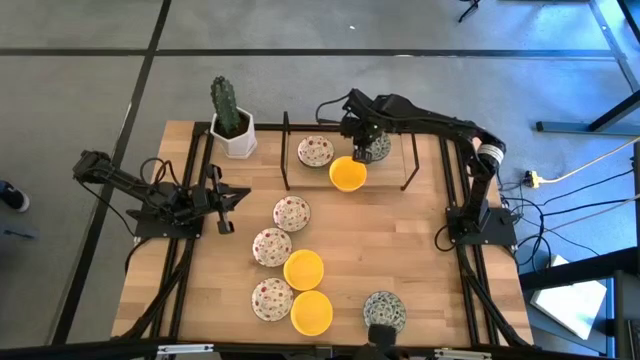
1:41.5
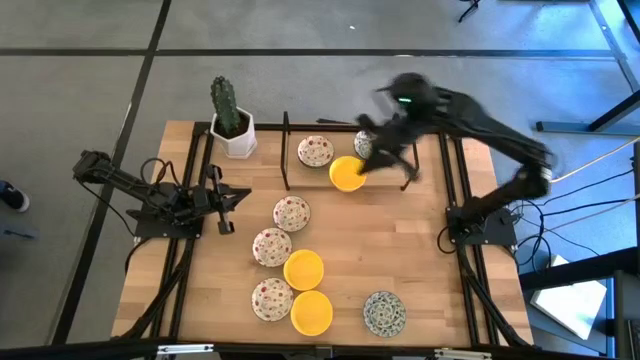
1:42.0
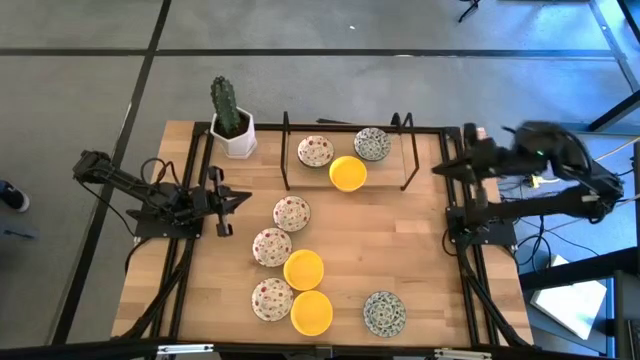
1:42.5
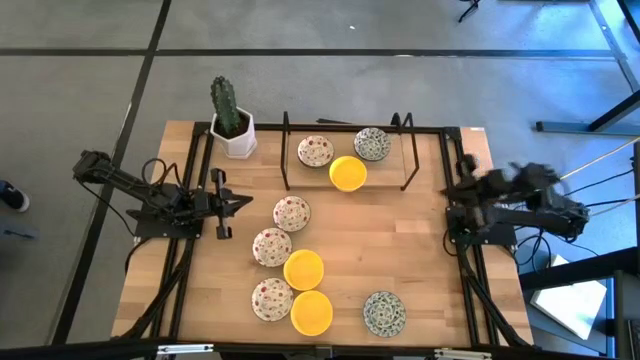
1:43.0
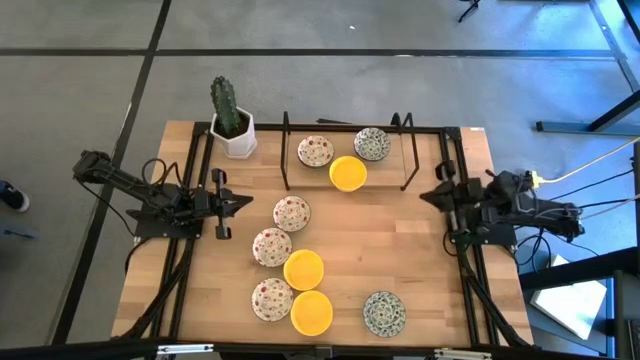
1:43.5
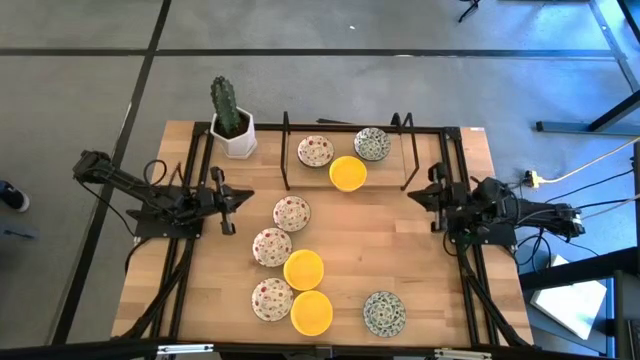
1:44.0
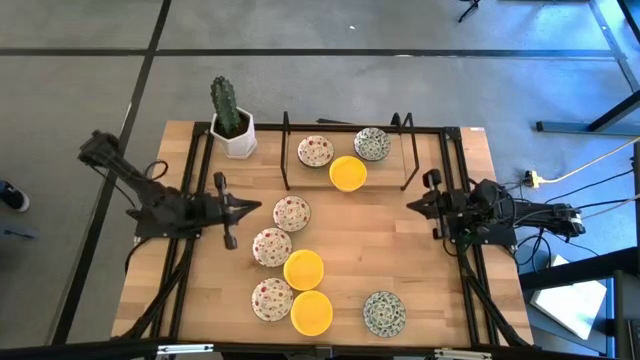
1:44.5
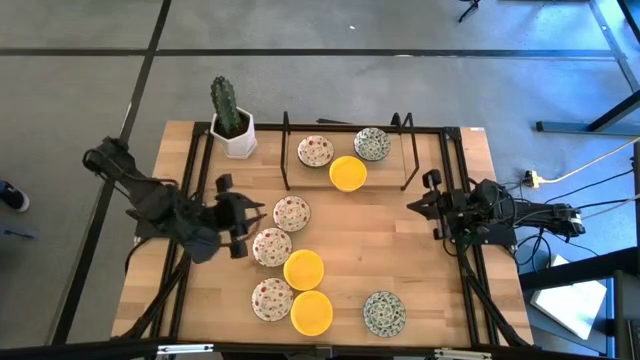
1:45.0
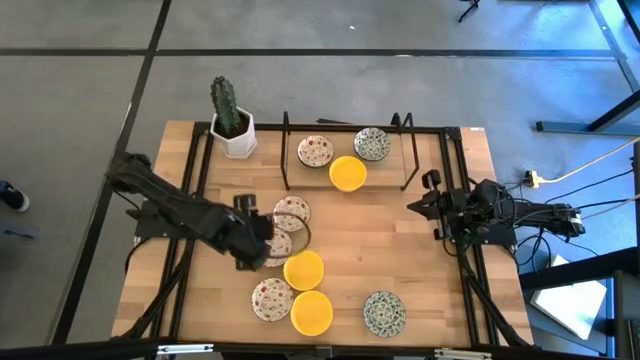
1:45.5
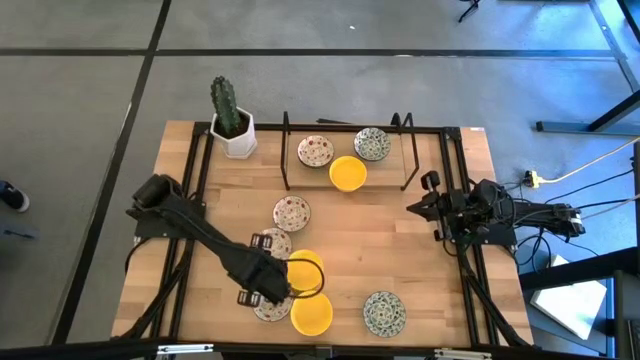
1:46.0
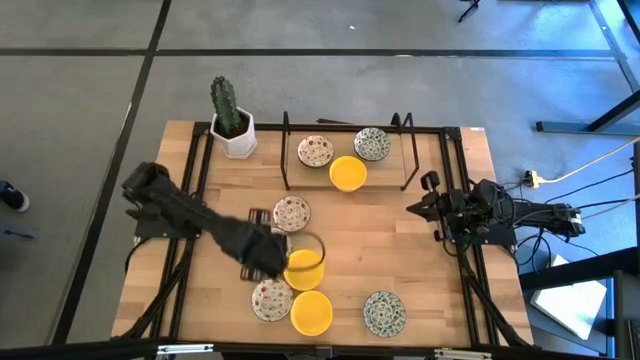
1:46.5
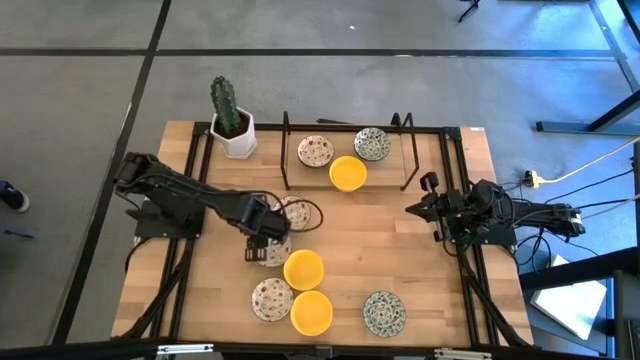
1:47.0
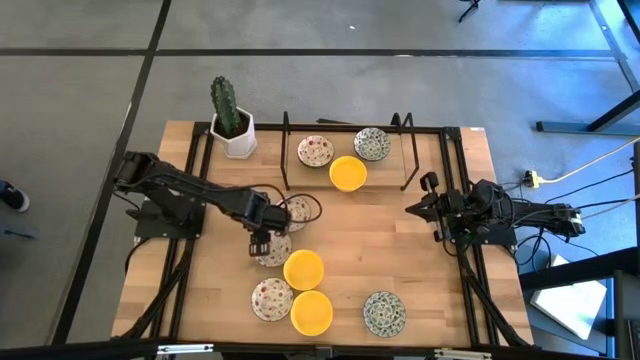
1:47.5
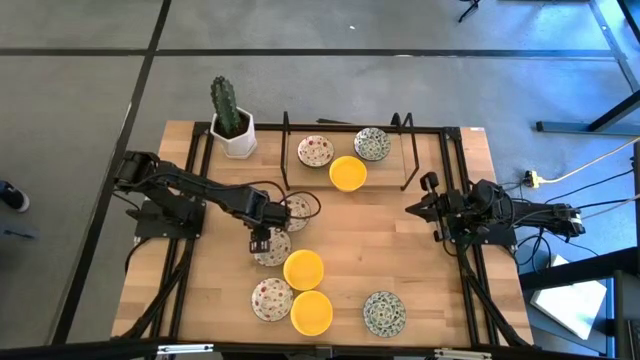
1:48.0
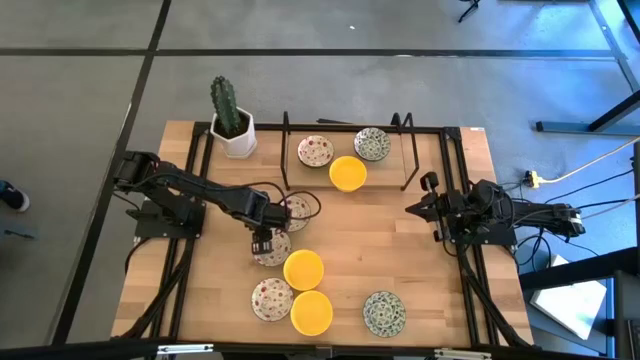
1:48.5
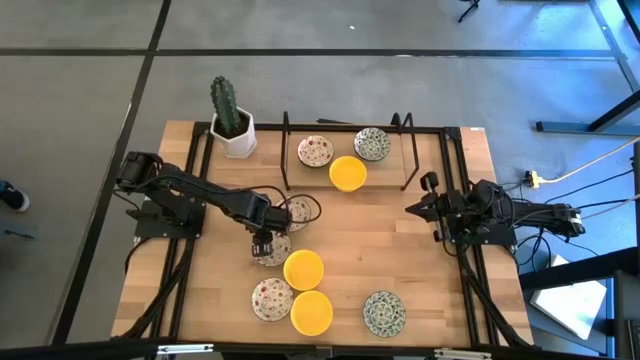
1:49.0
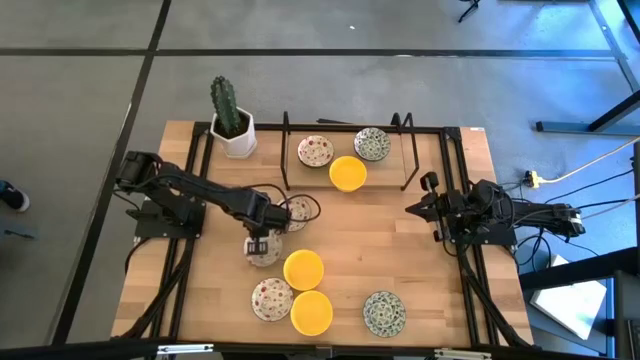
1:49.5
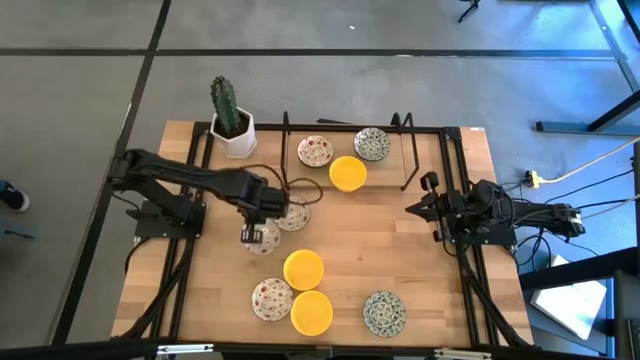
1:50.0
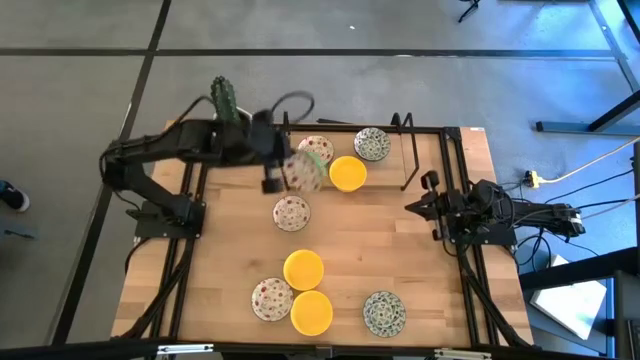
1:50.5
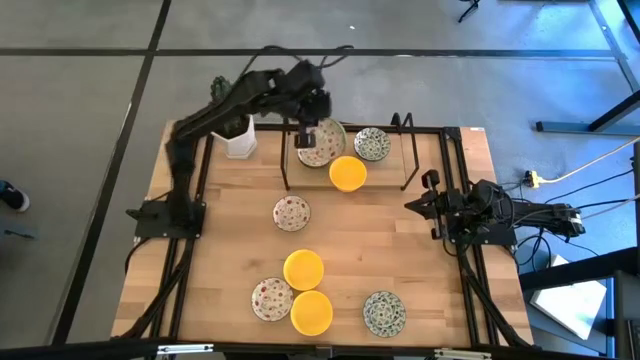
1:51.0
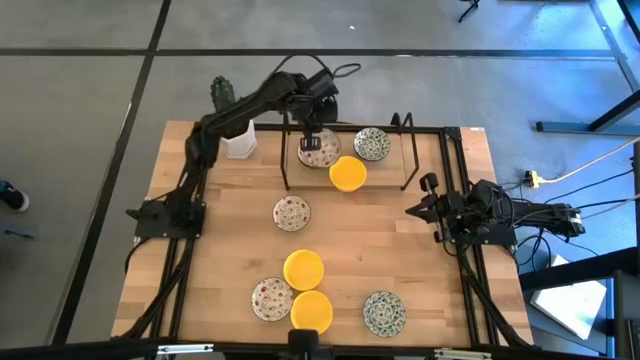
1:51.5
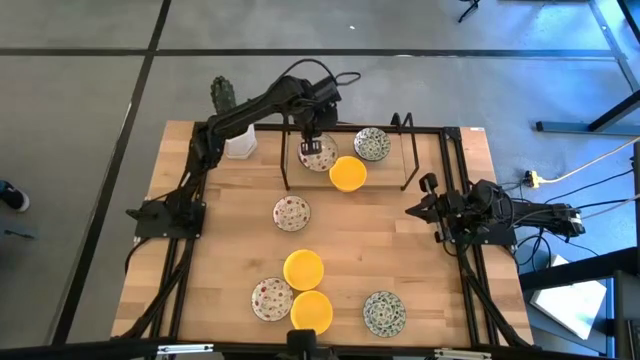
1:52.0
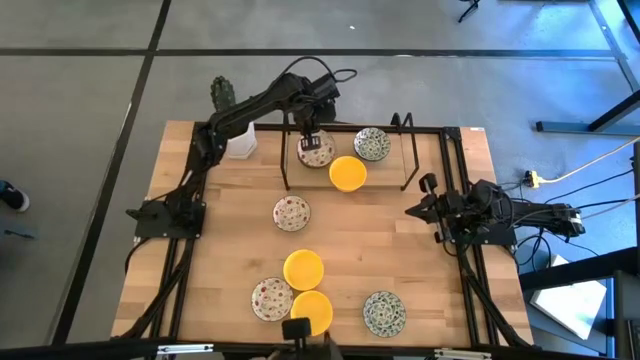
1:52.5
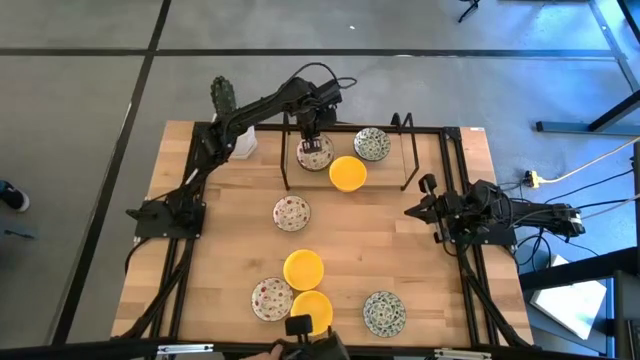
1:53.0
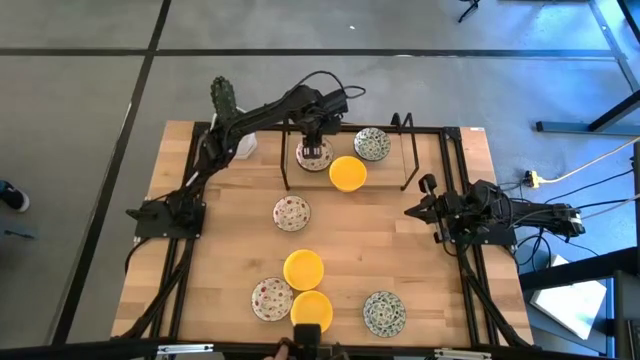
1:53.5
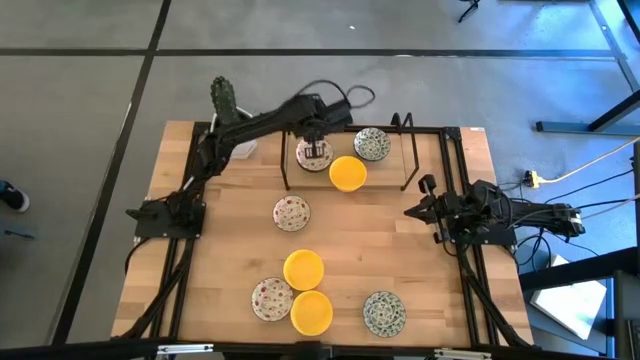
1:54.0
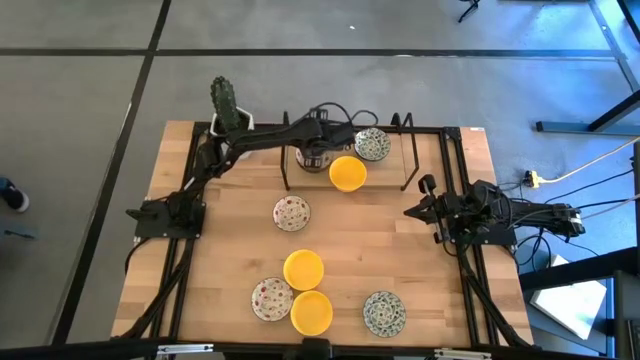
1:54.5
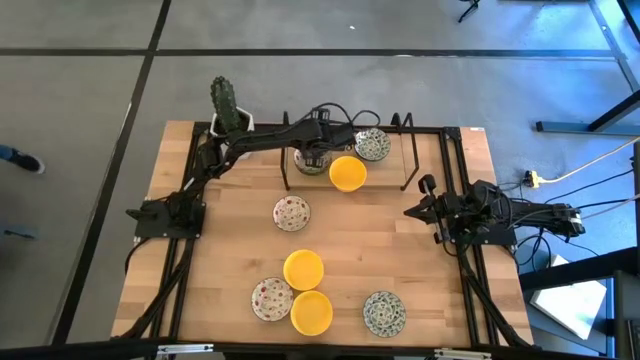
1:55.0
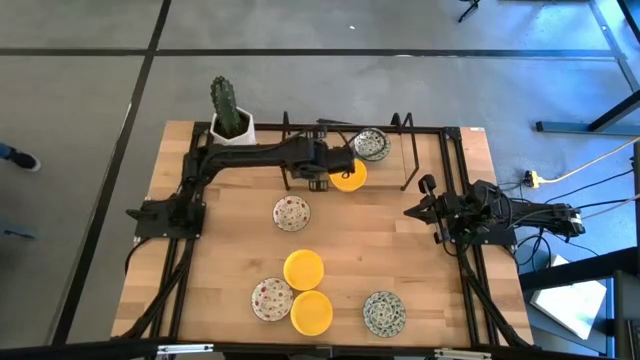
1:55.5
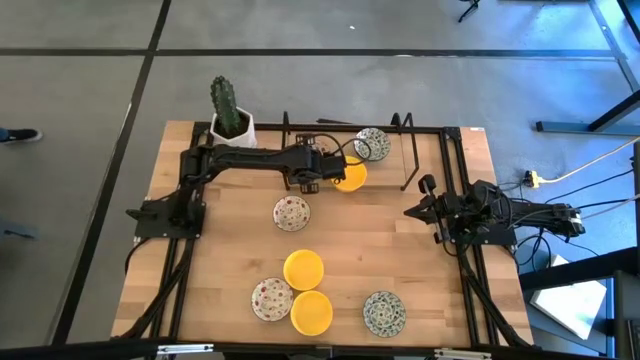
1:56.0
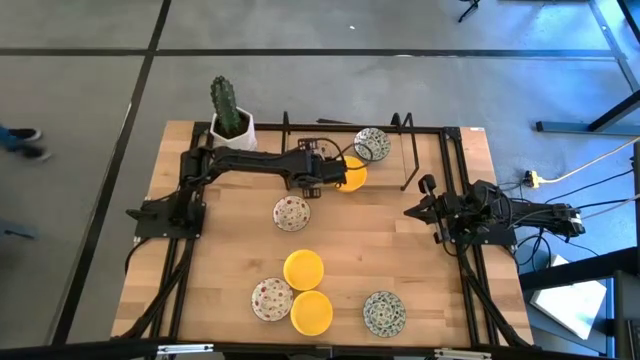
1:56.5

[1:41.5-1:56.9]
Task: Pick & Place Mini bowls
Stack the green patterned bowl on the green patterned bowls on the shelf

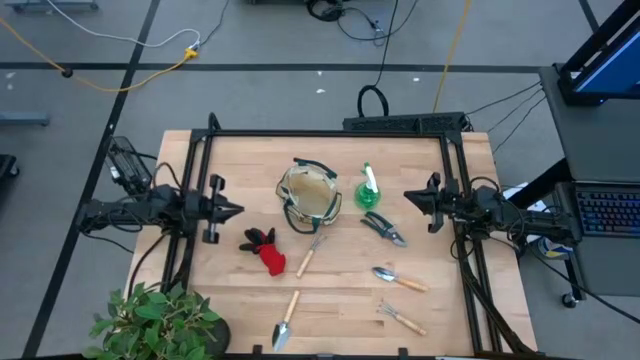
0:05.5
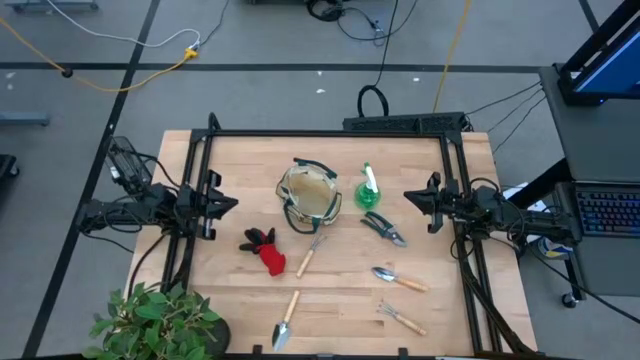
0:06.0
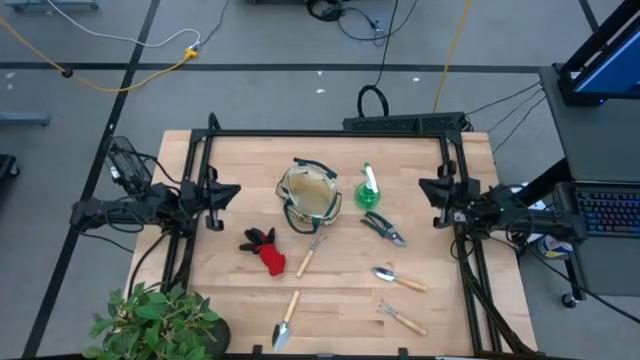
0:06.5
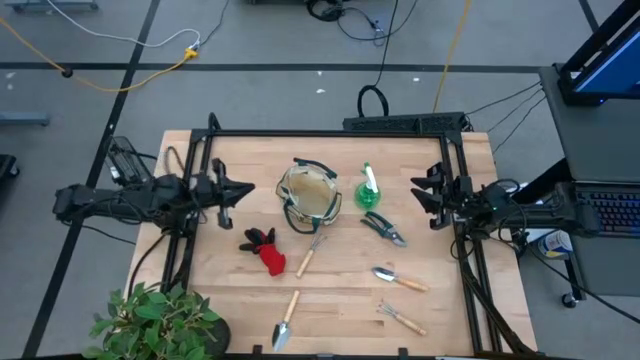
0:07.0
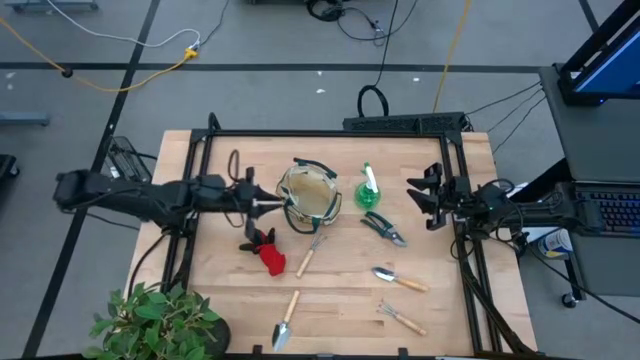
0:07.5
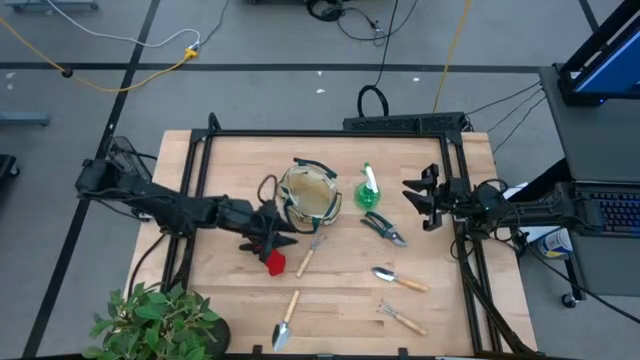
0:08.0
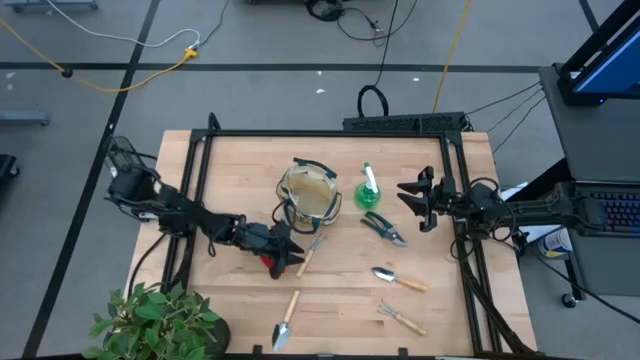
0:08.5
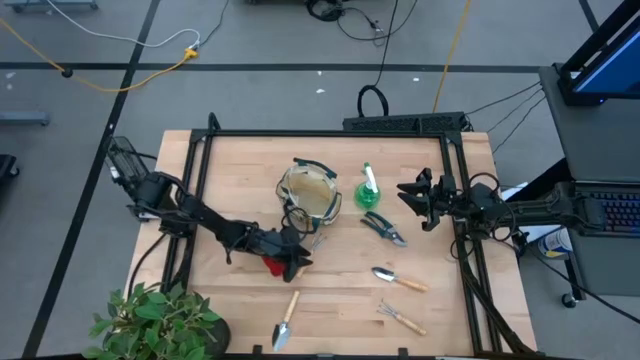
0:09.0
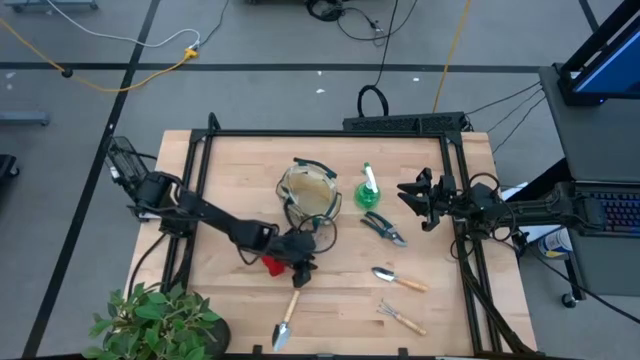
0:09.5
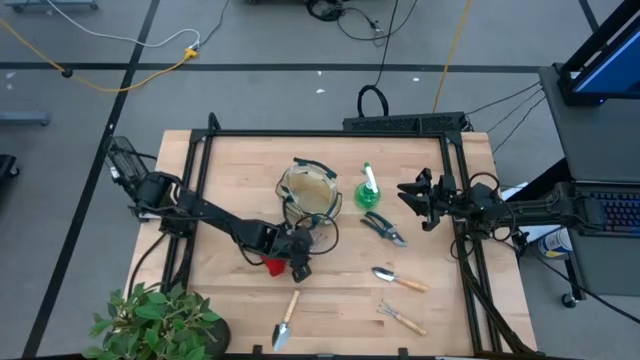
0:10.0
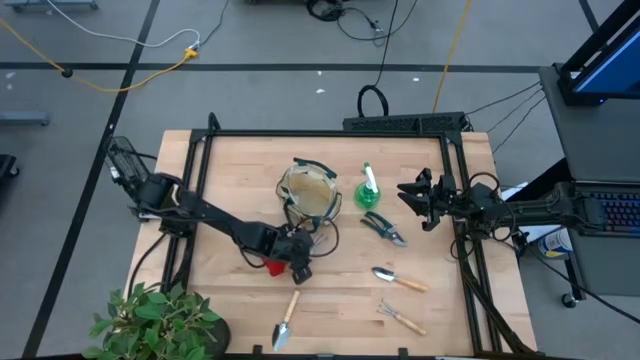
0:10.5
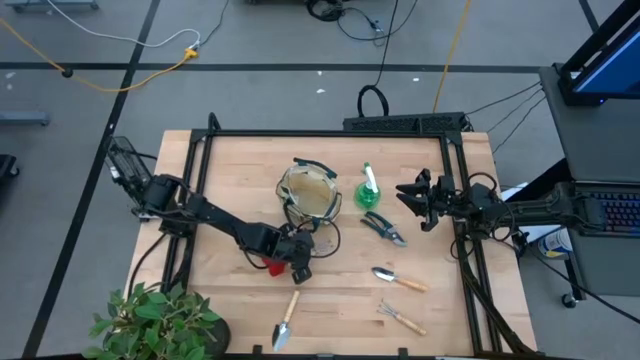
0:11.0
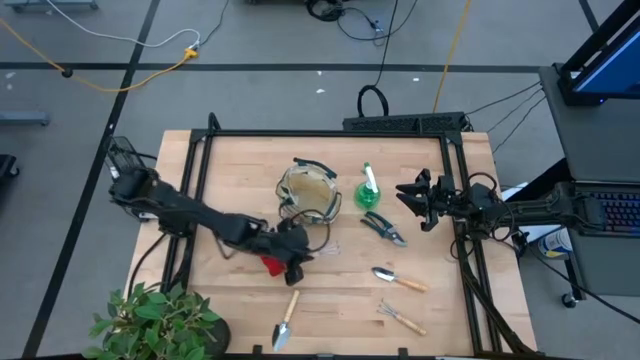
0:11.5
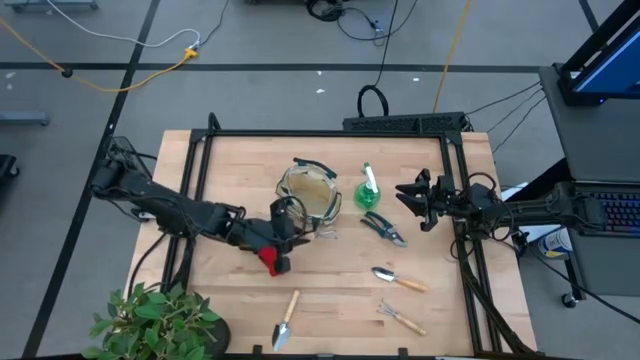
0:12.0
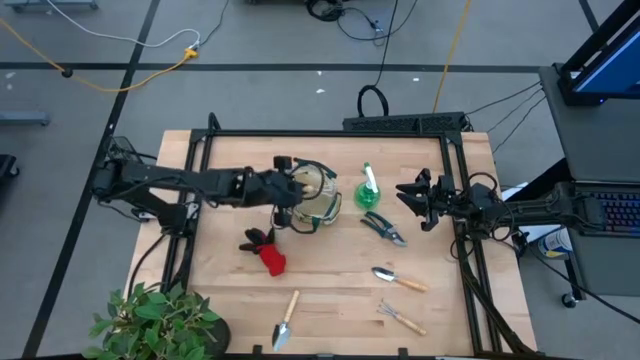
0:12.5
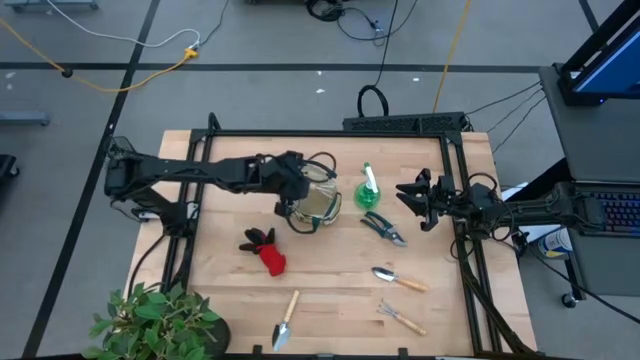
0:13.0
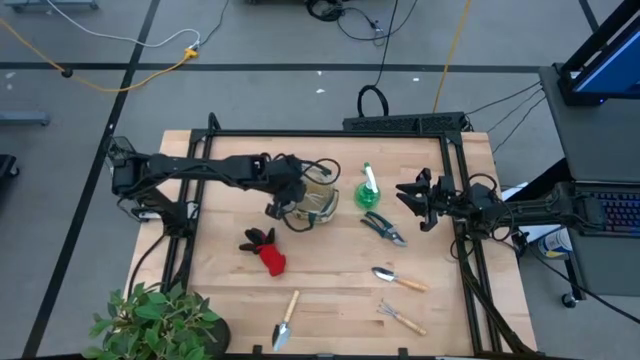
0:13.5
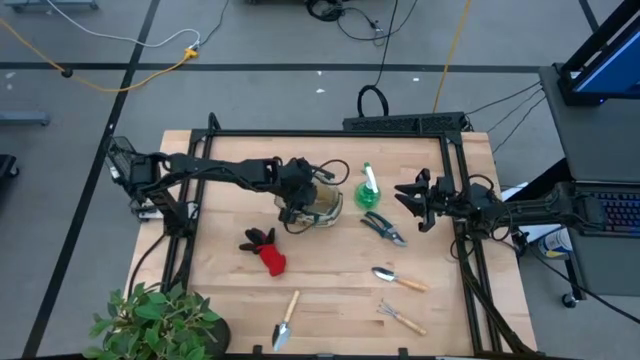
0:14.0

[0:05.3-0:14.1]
Task: Pick & Place Garden tools in Gardening bag
Put the top brown hand rake into the light brown gardening bag
